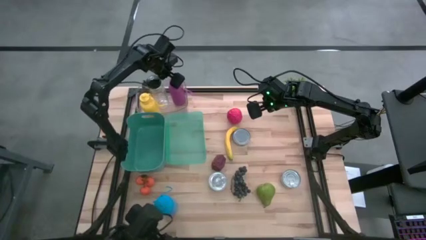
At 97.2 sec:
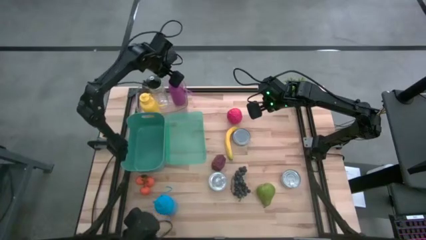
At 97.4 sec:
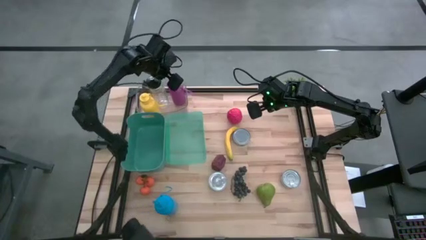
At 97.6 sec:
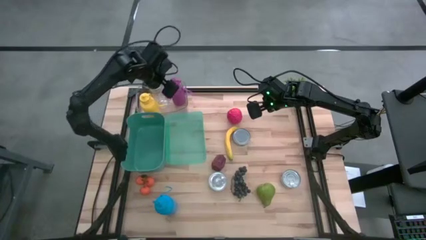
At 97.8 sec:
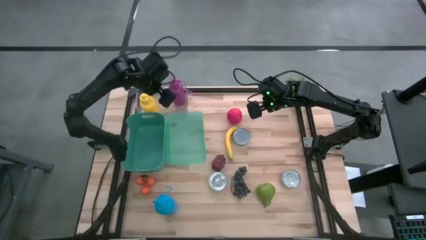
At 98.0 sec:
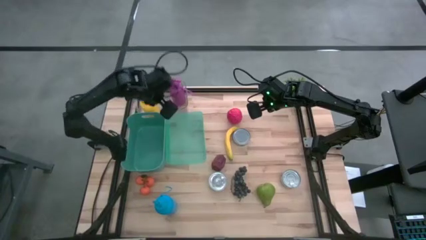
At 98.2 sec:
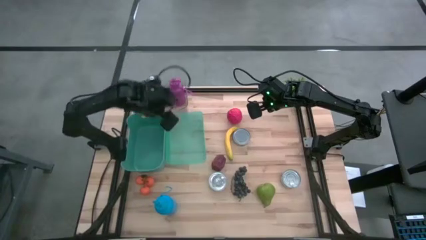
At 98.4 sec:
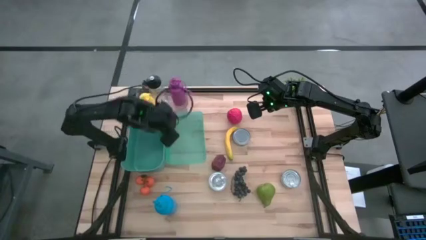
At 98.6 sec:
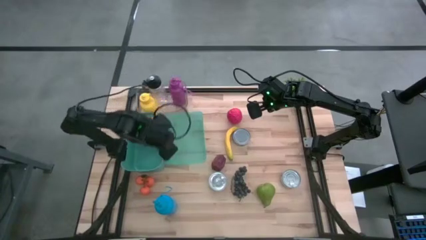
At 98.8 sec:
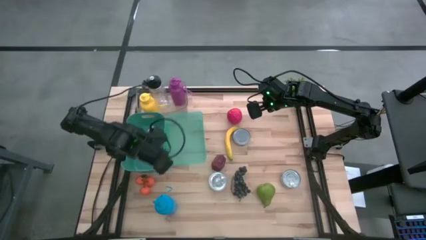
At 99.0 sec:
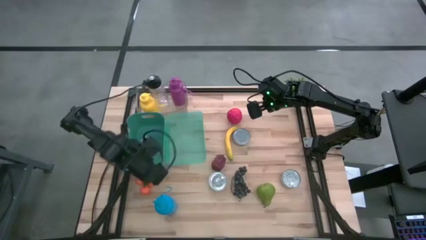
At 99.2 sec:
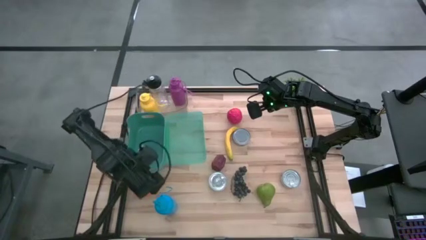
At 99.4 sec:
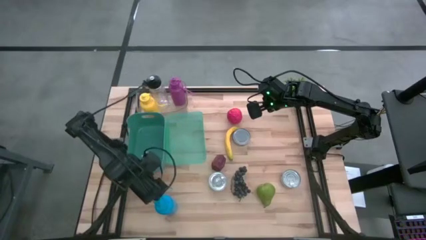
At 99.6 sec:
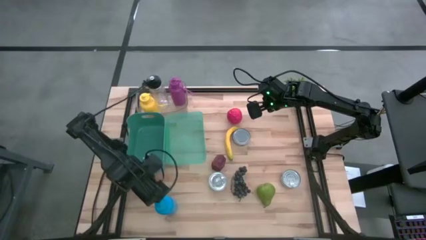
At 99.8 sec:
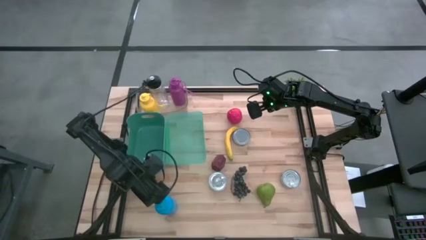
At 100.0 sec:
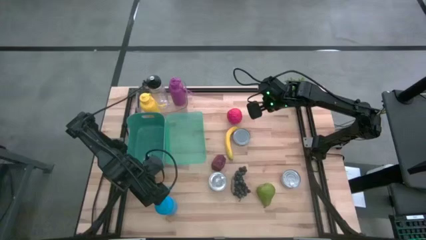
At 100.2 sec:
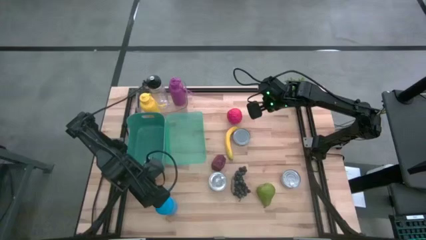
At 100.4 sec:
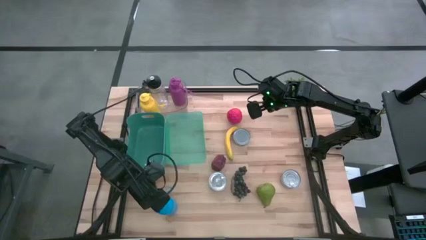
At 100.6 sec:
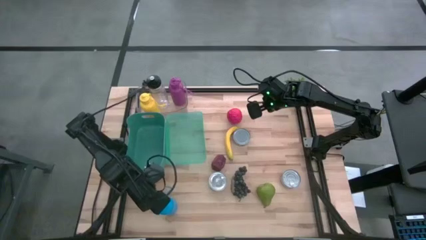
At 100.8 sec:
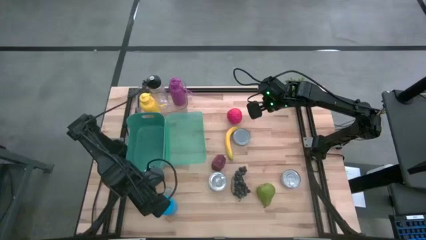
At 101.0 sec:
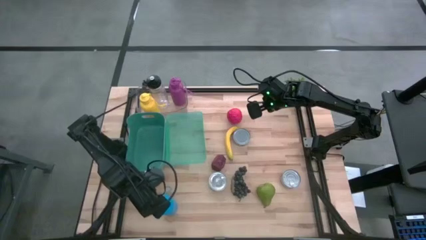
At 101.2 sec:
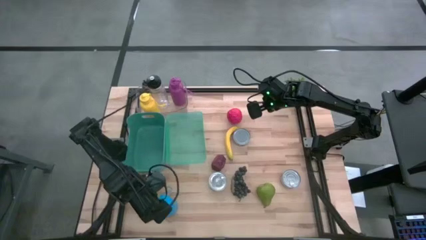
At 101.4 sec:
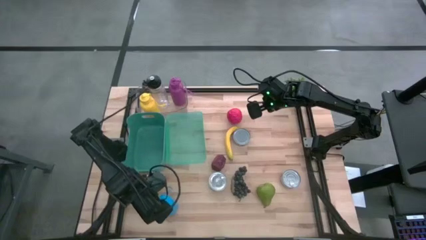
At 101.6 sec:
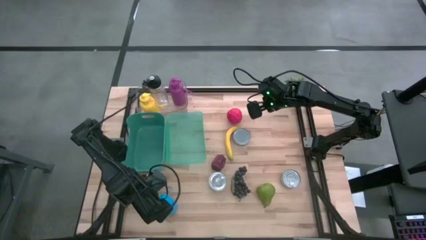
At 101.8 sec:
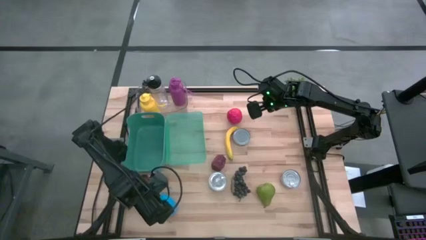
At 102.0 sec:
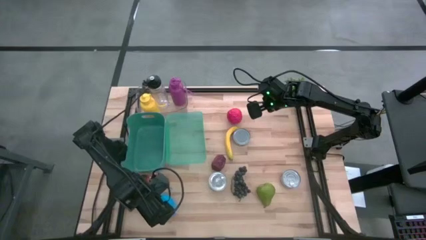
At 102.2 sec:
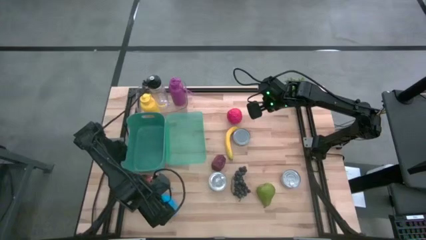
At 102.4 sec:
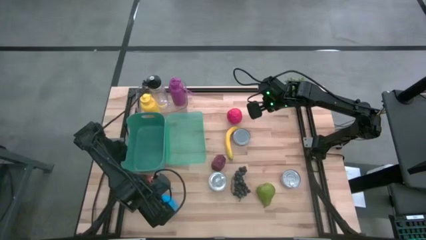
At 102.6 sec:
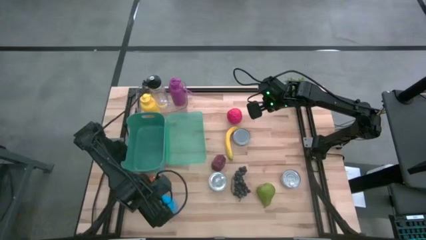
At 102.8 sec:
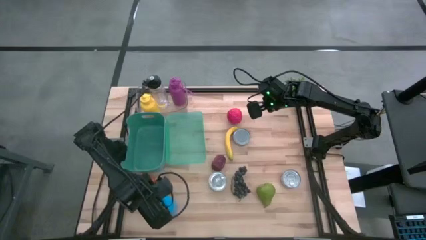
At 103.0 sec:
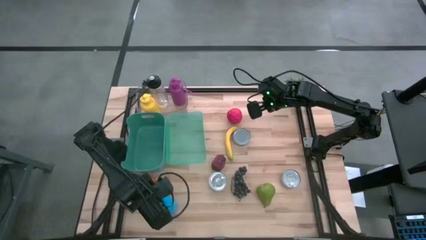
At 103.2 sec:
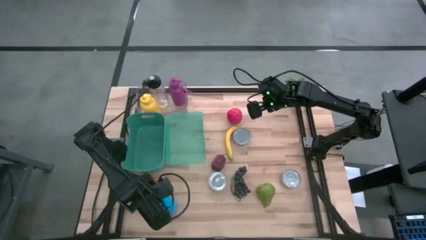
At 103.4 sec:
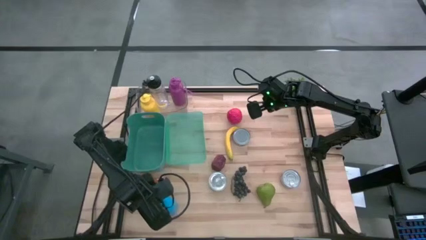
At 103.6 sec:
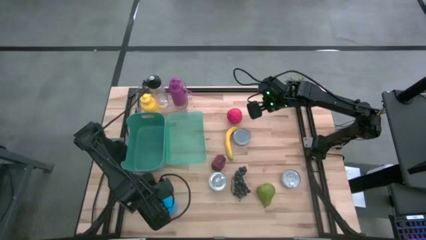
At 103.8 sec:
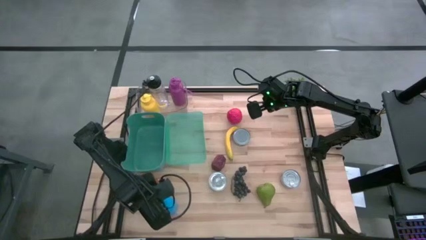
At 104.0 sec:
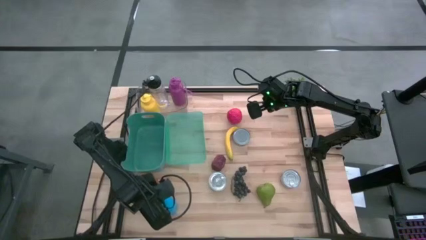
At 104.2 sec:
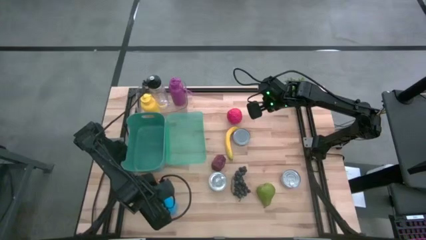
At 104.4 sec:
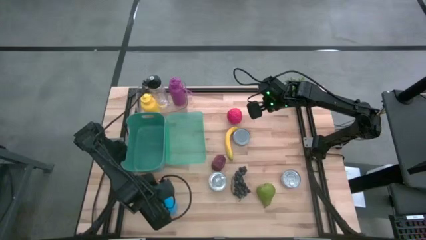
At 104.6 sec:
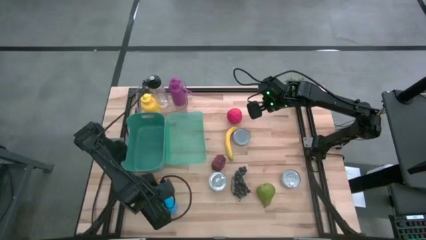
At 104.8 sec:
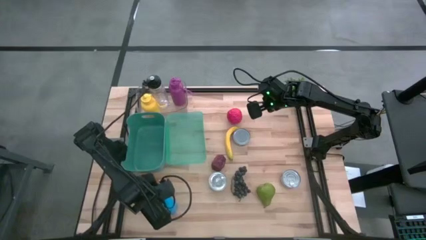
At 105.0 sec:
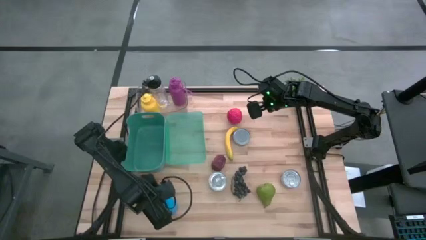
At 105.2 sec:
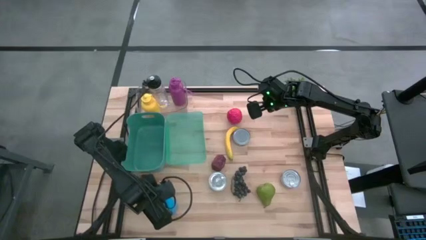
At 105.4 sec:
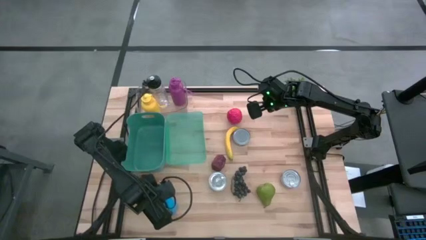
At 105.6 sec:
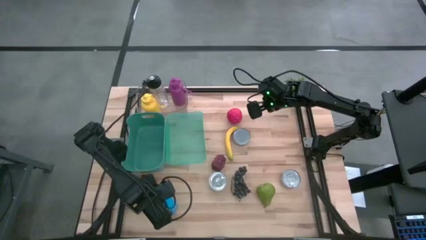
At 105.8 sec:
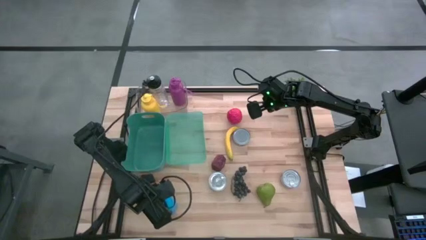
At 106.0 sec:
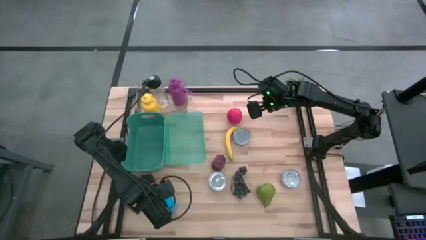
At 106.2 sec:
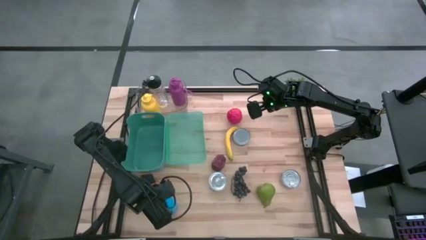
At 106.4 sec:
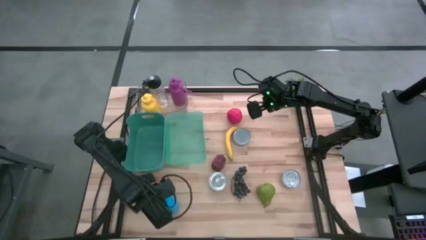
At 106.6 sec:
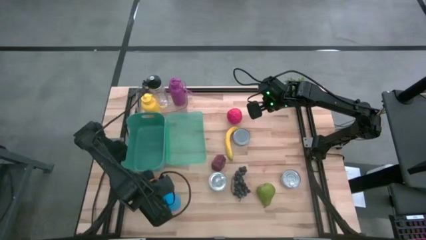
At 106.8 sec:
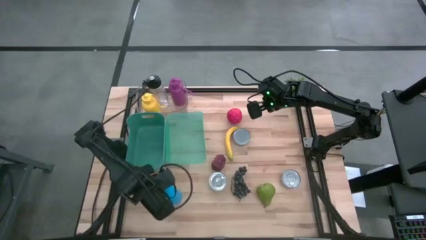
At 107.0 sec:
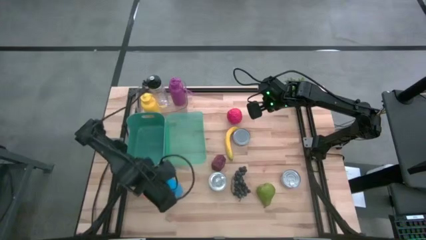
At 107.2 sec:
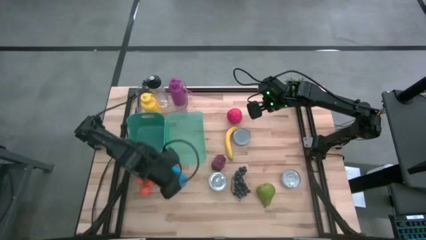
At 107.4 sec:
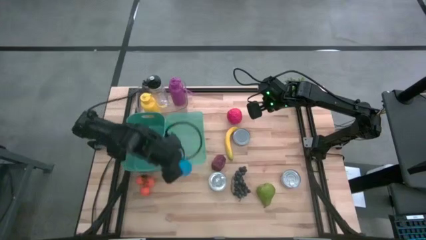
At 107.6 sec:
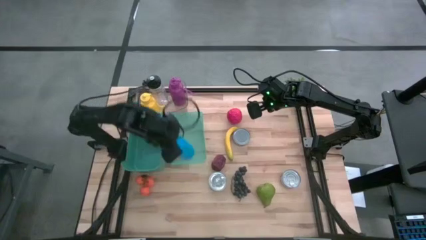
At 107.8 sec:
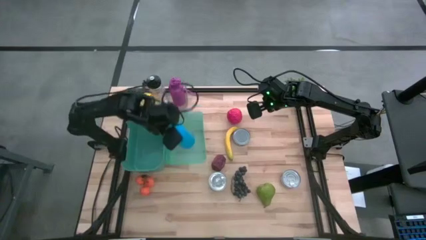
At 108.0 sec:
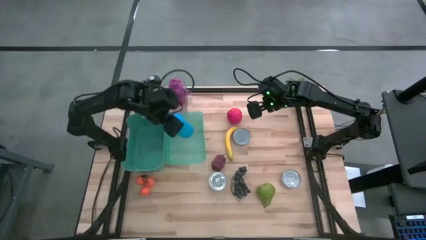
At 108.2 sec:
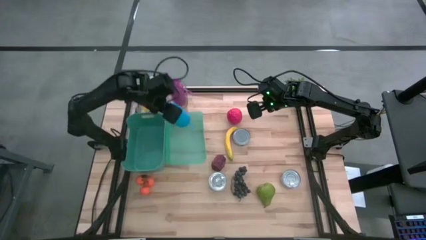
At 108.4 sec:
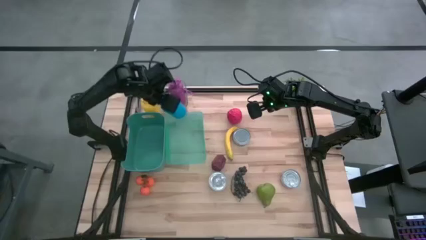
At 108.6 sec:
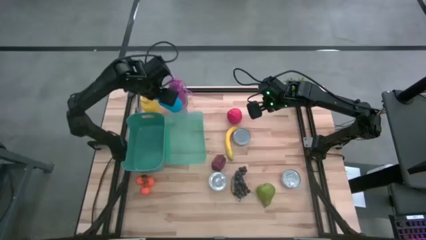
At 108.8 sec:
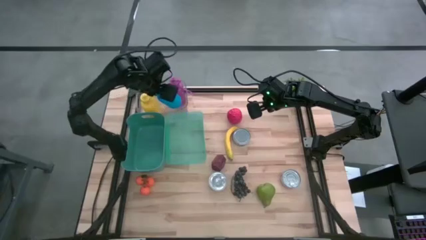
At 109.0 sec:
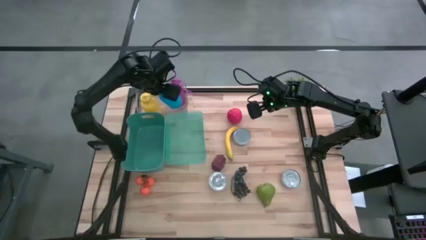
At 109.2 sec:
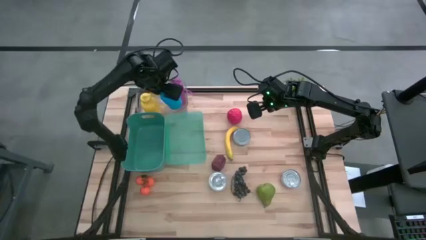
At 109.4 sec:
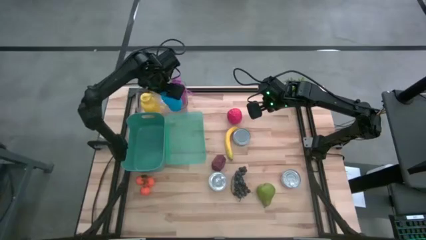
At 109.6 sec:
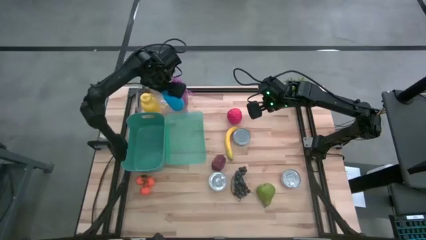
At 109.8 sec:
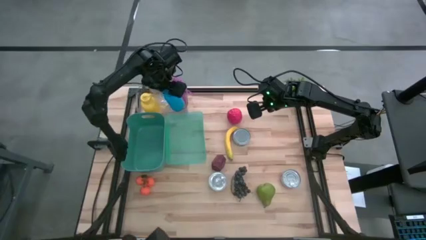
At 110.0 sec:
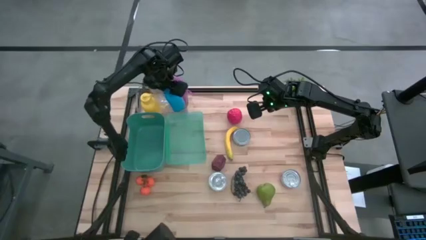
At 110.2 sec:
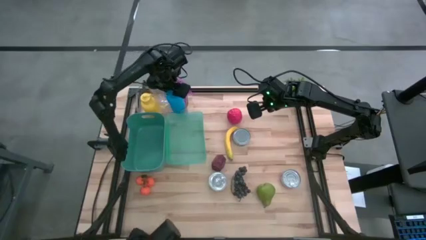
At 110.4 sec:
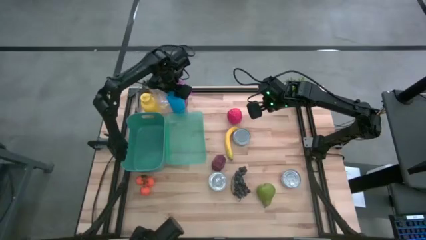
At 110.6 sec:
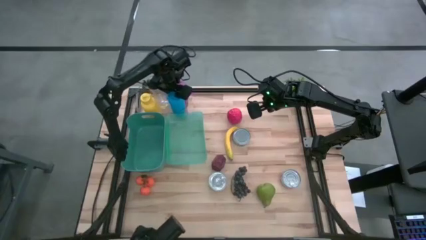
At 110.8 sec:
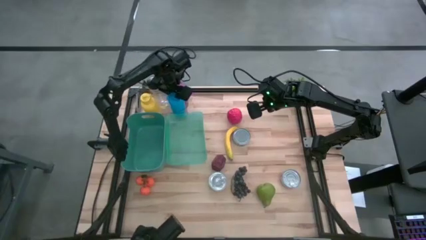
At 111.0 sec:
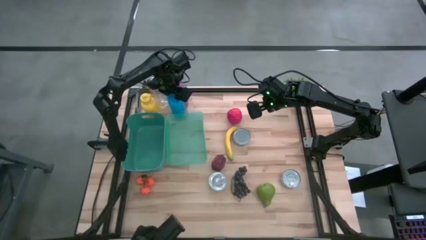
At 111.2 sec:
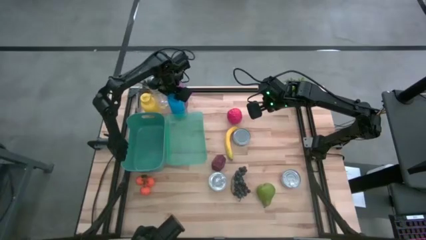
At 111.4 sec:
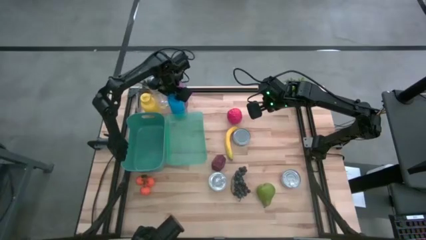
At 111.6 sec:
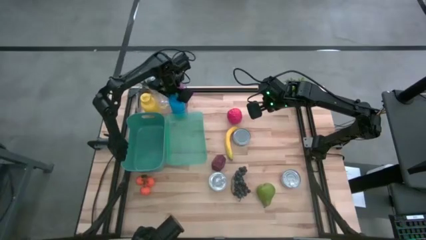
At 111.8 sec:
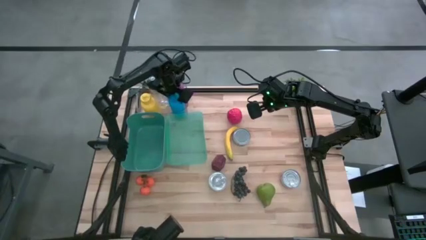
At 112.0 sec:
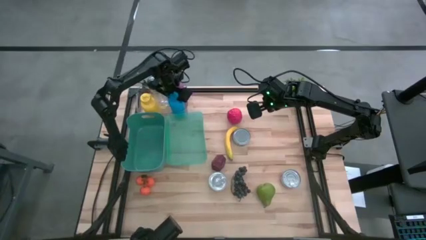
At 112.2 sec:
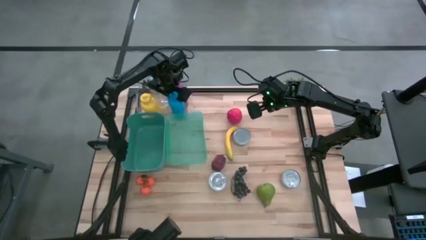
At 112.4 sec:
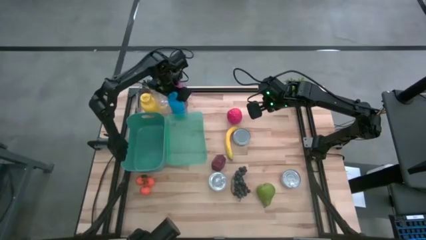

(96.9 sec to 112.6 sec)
Task: Pick & Place Food Item
Put the blue water bottle into the transparent bin
